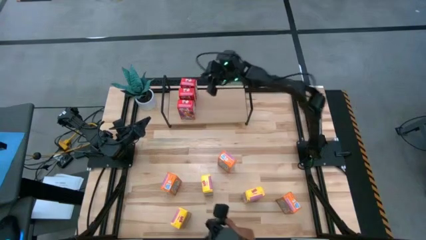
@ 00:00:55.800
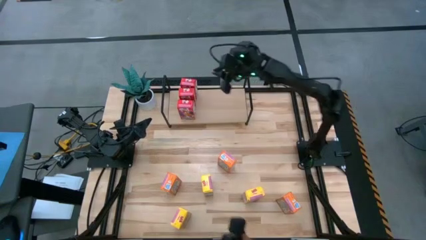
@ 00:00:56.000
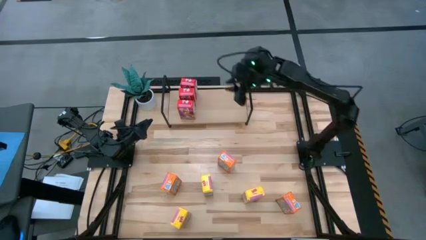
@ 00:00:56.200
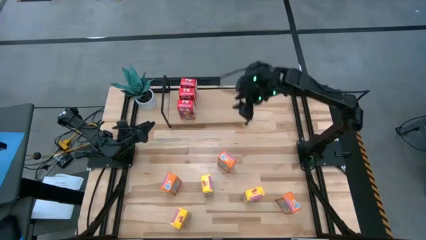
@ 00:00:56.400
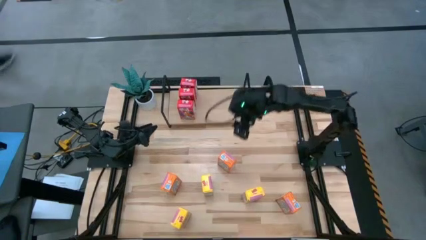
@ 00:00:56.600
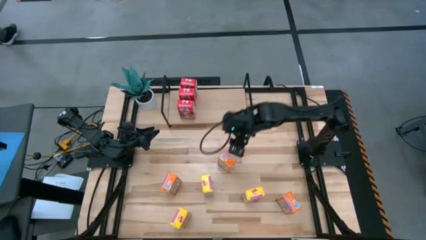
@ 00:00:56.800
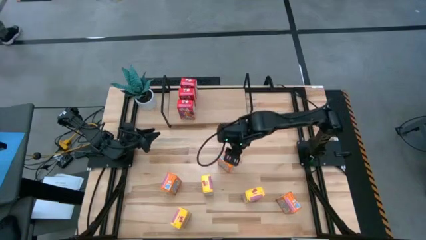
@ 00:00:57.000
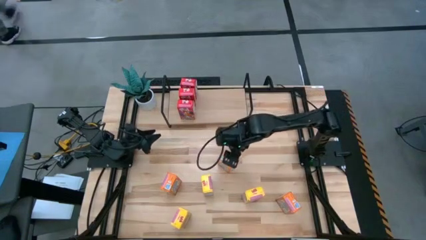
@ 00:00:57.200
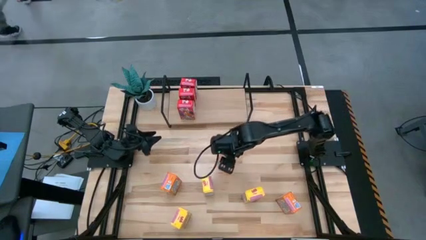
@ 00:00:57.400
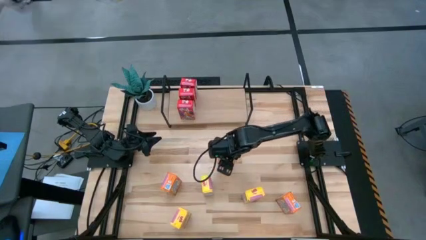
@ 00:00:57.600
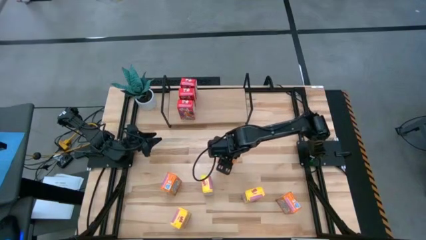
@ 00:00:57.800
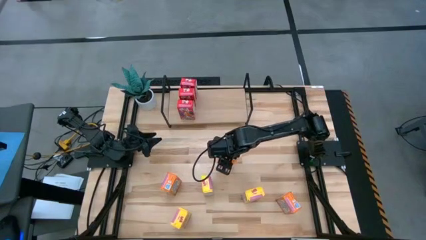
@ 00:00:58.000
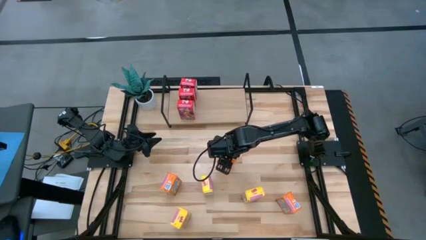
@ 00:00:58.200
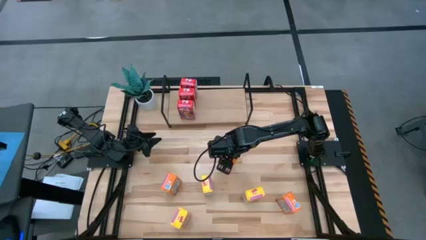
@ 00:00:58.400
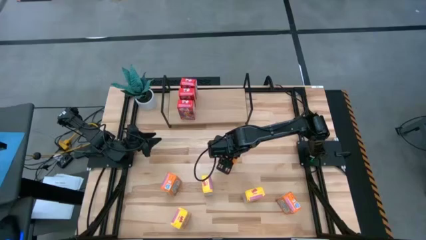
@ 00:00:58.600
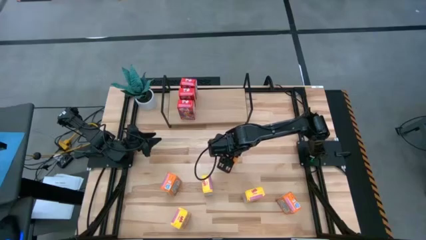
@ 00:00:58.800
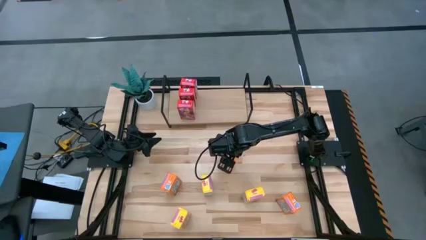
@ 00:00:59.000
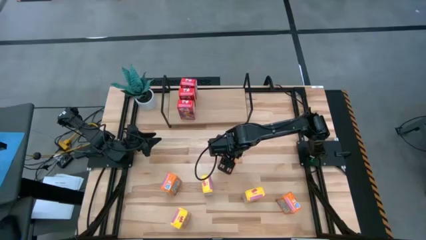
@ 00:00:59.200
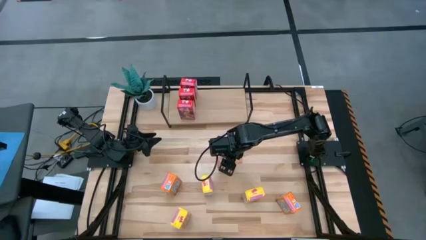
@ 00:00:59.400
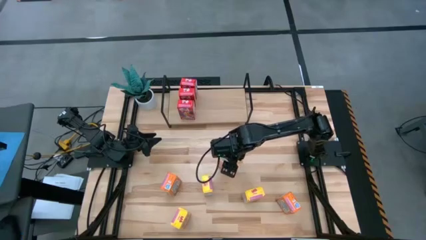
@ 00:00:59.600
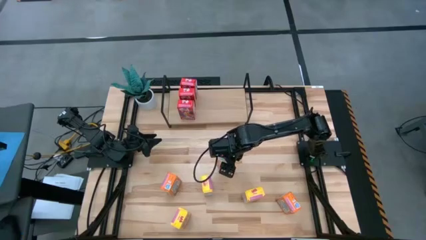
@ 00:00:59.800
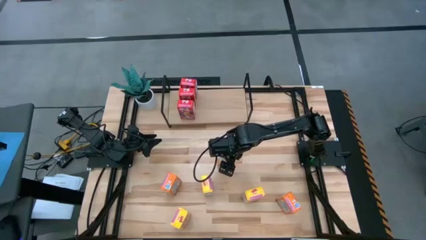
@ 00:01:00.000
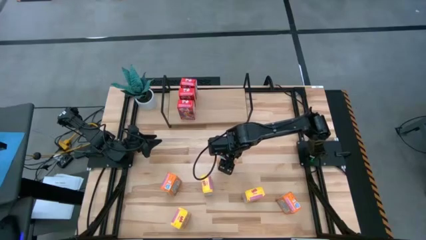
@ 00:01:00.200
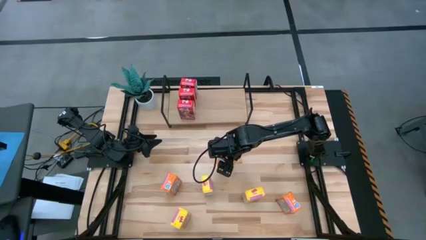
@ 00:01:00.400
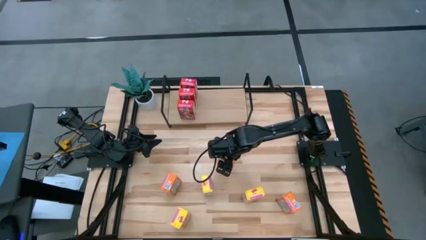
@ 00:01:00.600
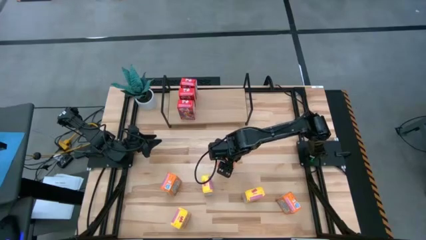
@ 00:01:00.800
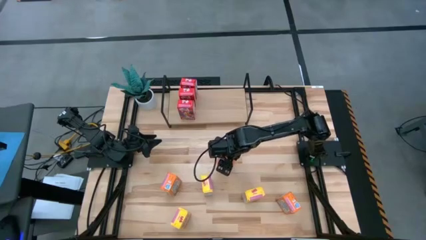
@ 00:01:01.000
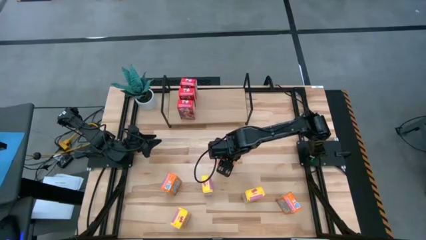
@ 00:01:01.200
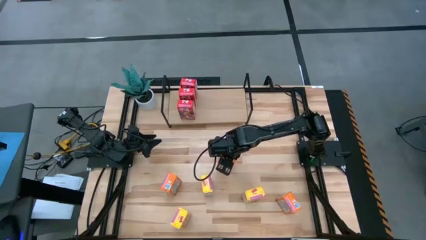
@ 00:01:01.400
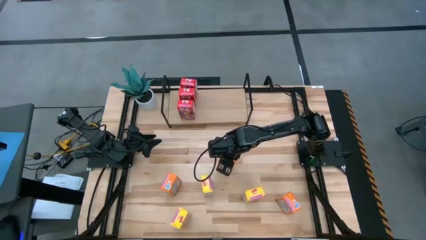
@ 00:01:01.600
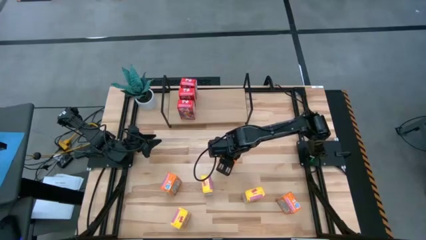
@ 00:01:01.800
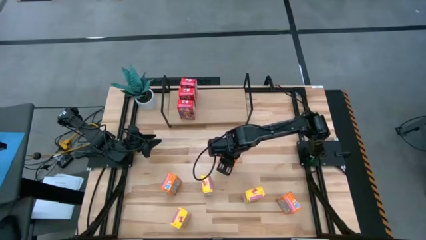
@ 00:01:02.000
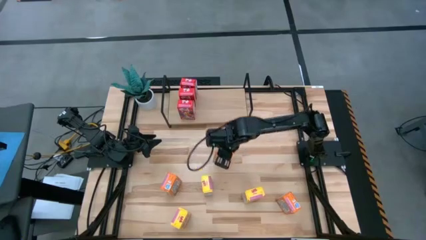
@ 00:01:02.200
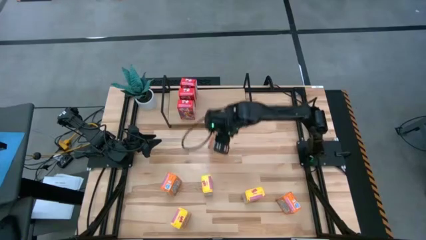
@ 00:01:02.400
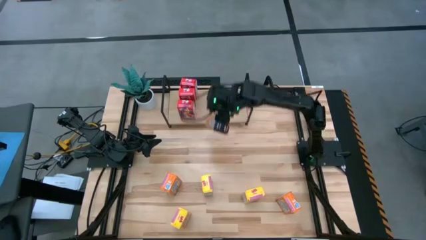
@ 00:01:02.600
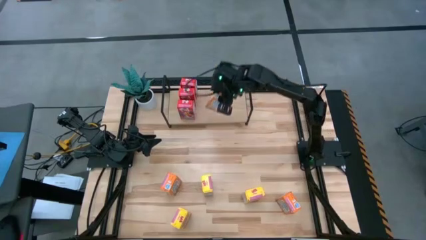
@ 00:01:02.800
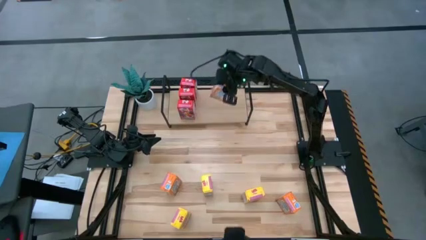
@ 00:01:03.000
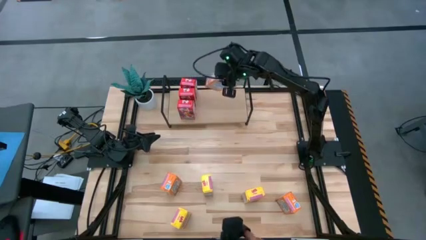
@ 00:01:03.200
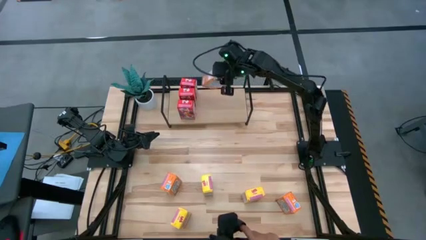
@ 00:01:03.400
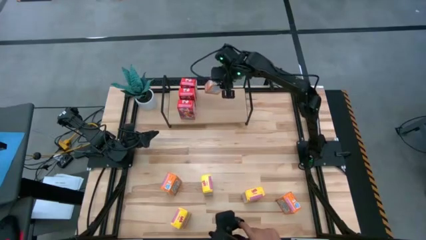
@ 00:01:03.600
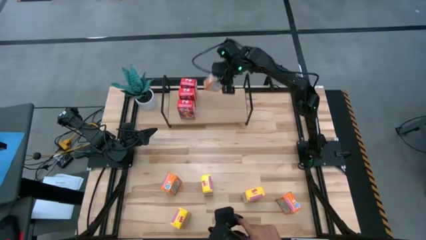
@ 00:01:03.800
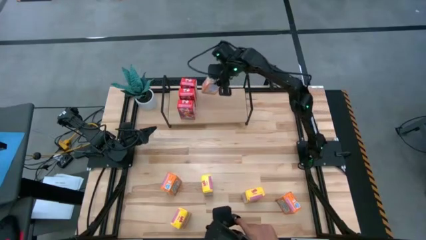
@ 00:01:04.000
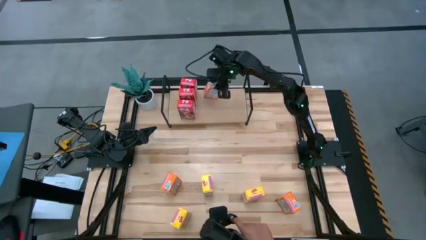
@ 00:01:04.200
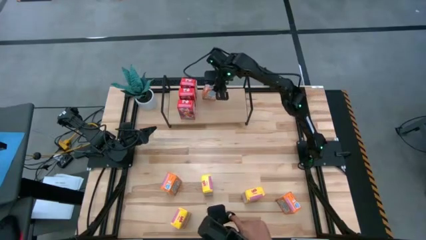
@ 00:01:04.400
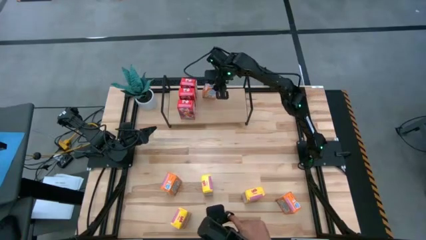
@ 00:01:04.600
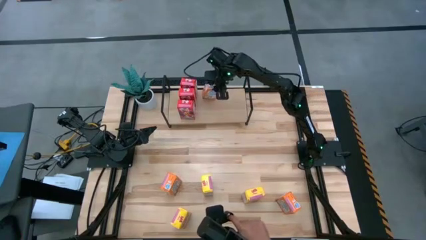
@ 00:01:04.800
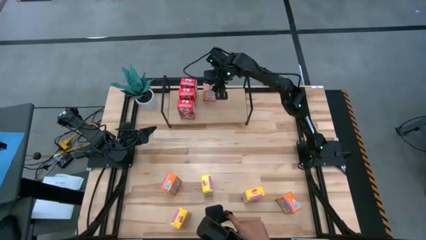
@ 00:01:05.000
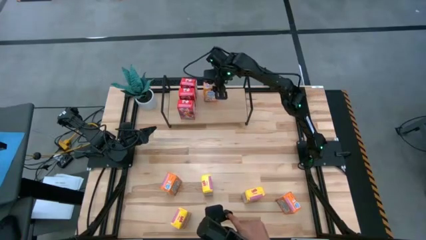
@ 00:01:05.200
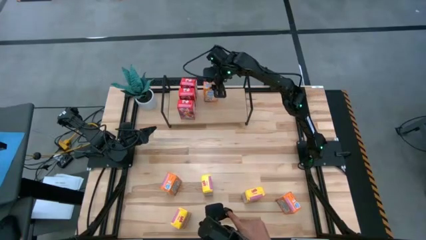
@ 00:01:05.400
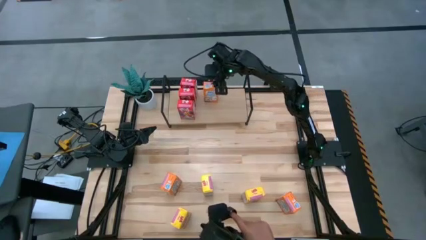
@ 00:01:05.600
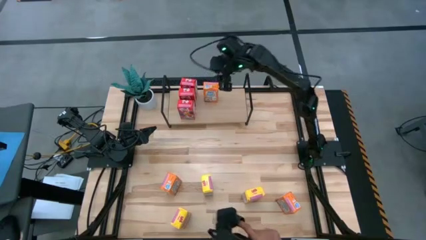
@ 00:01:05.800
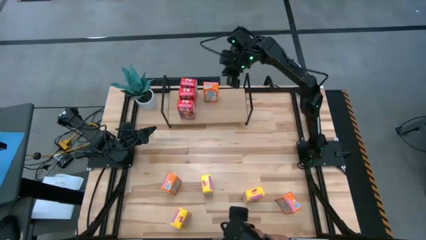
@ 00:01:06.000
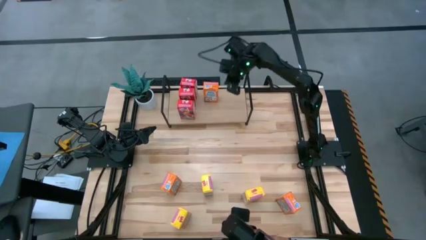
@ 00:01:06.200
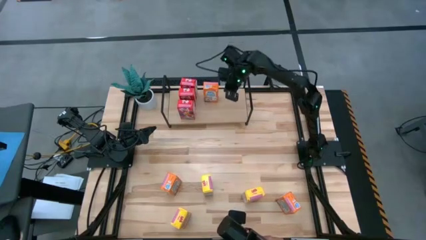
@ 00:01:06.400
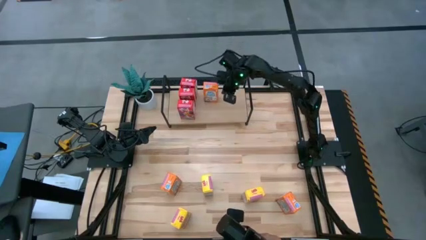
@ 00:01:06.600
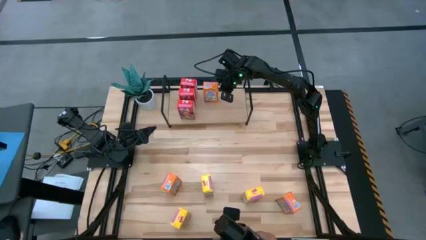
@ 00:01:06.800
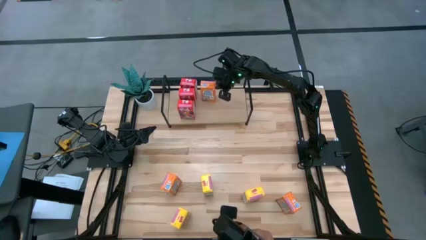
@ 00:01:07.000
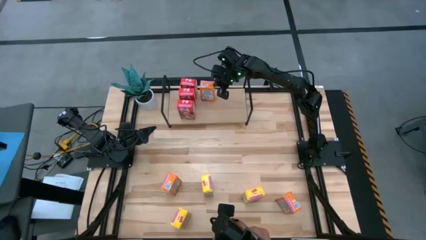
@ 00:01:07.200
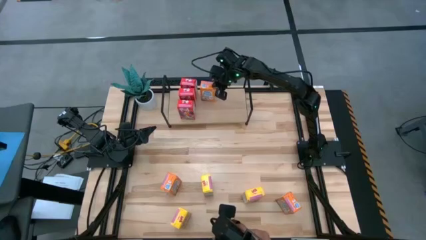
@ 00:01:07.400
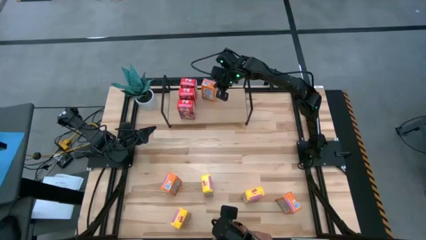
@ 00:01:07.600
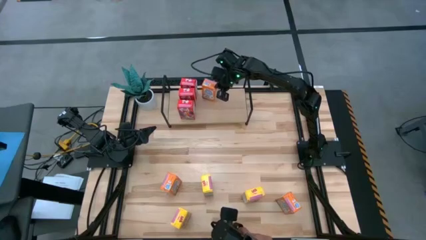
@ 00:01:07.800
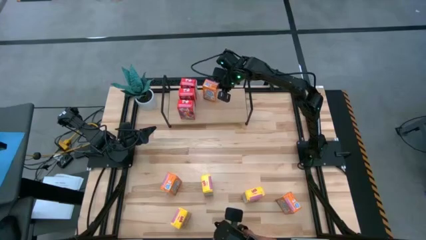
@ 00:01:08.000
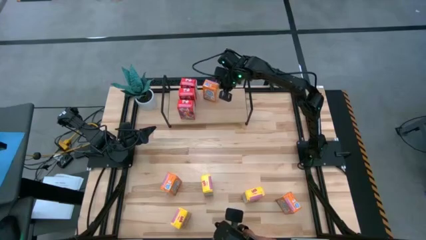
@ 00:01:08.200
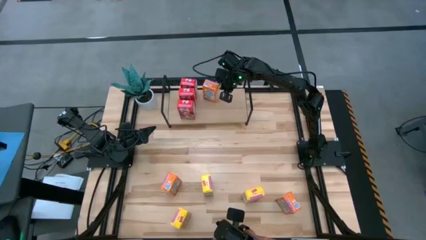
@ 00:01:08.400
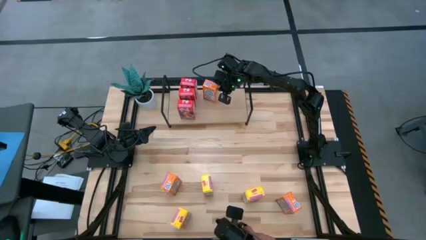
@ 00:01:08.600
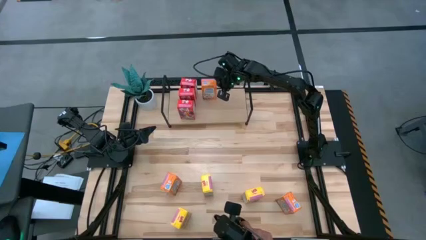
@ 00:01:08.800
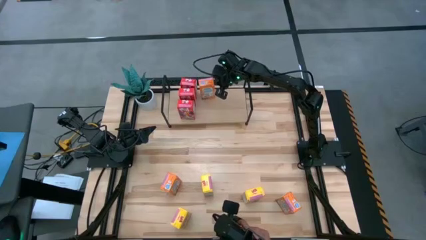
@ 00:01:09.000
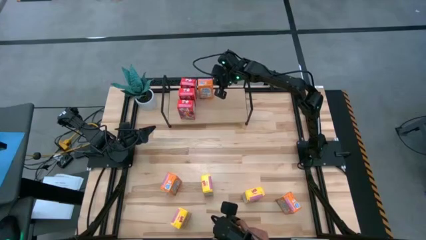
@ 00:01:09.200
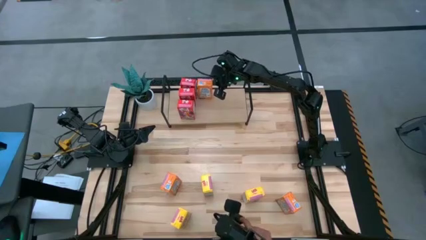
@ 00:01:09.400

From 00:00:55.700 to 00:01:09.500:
Task: Stack cereal on shelf
Put the top orange cereal box on the shelf
